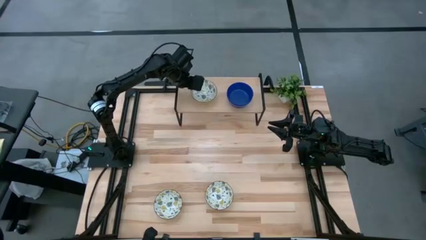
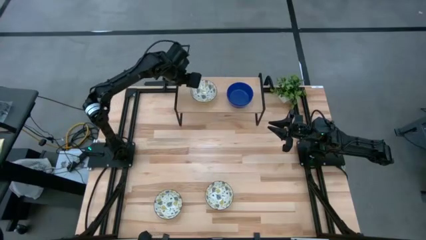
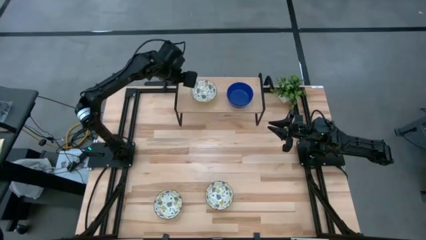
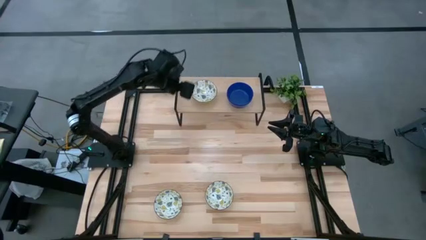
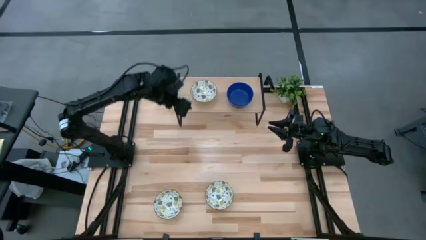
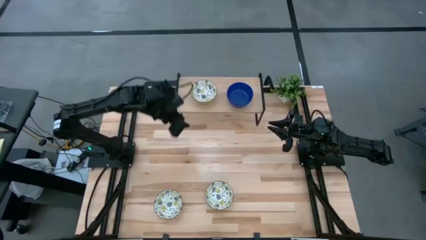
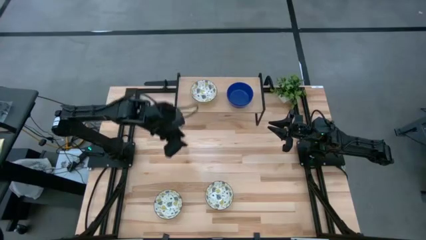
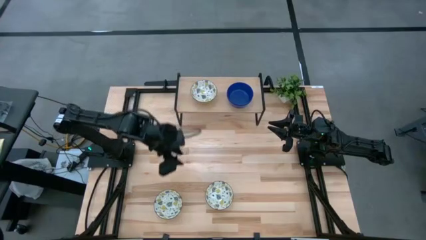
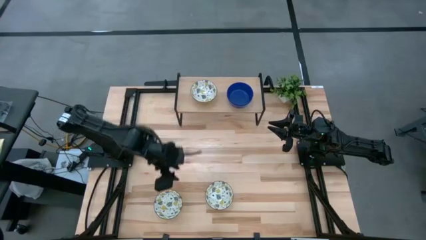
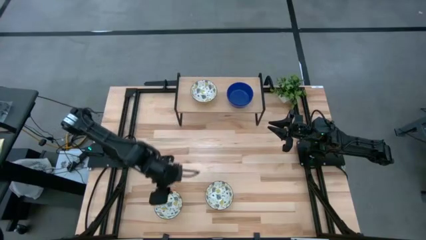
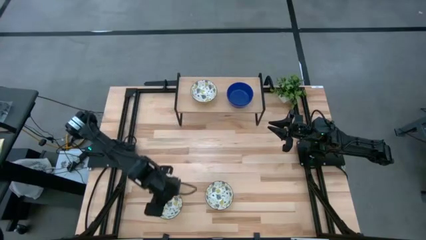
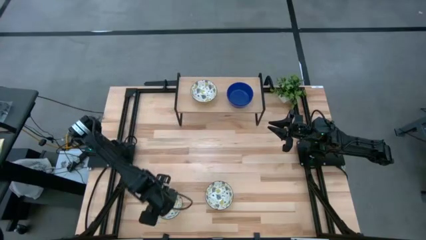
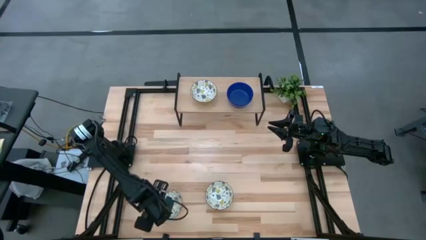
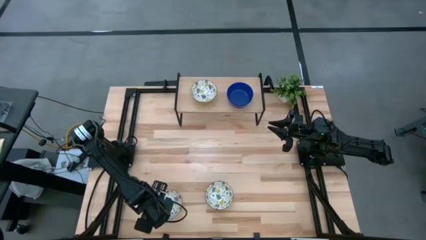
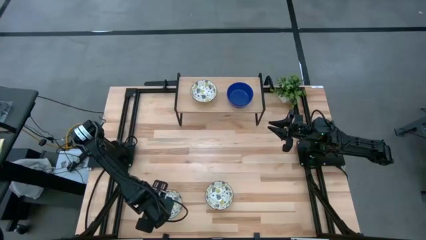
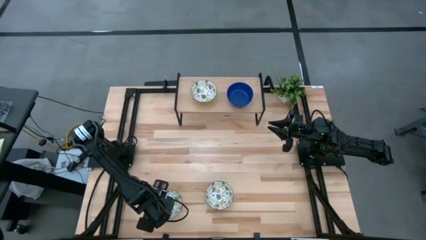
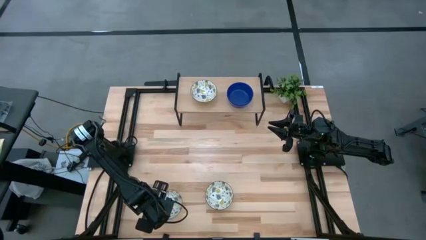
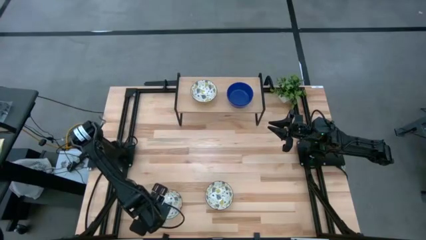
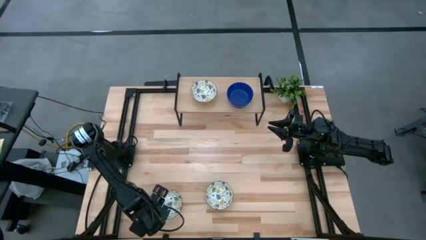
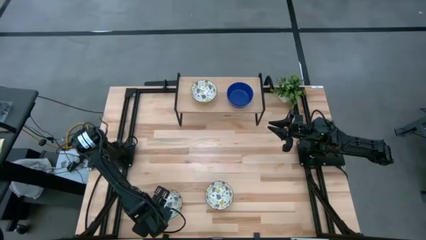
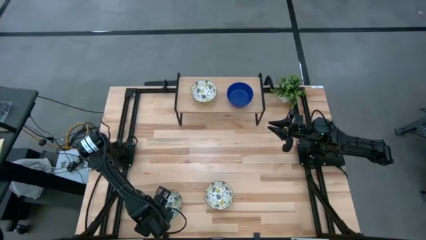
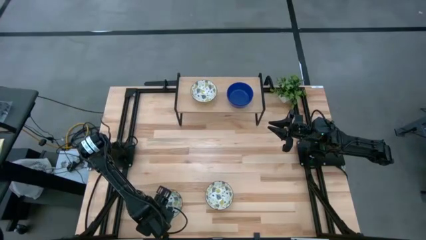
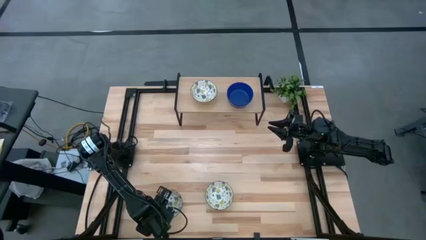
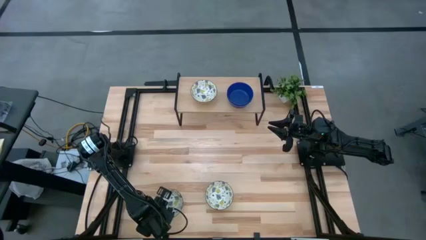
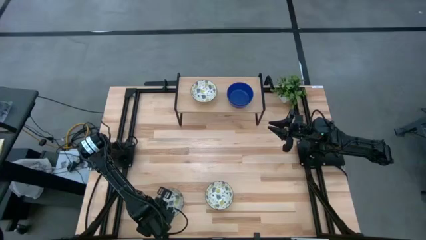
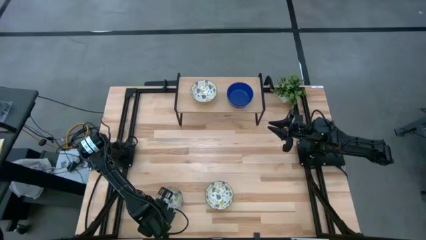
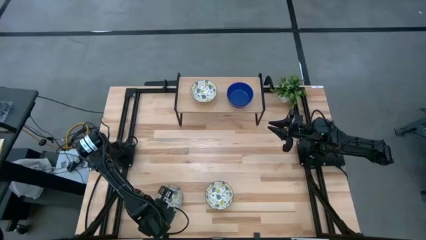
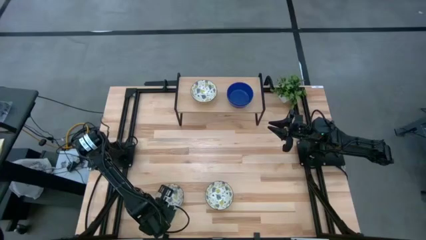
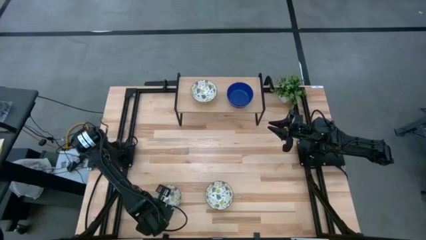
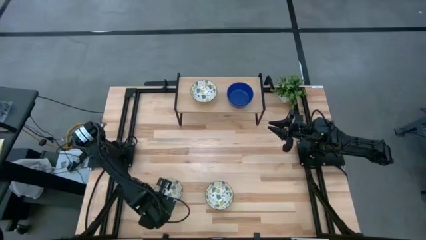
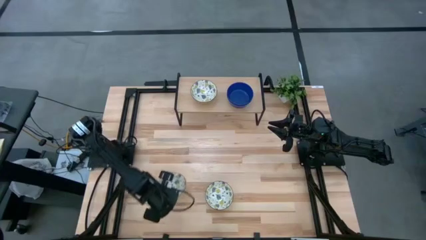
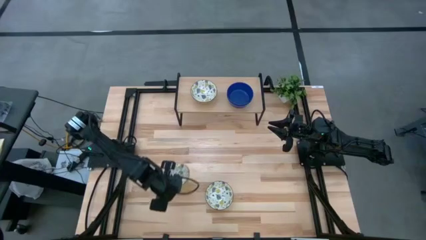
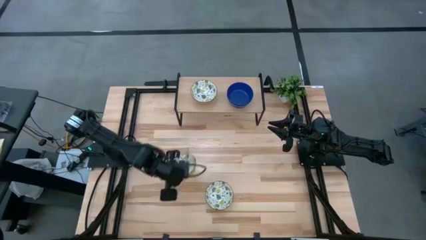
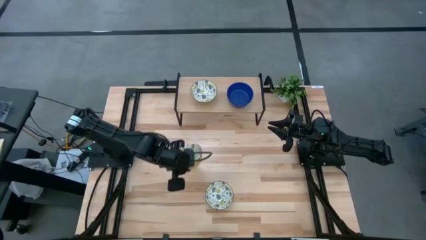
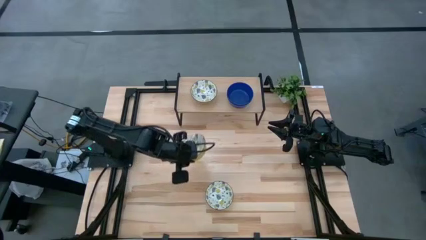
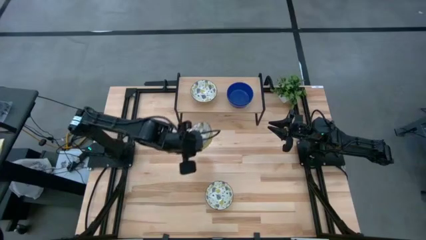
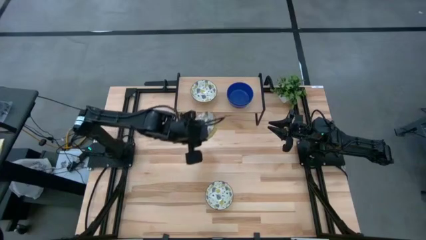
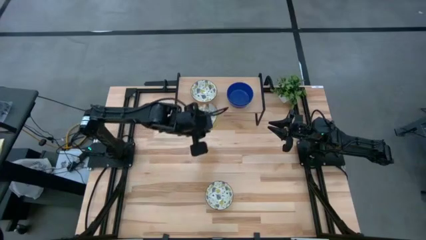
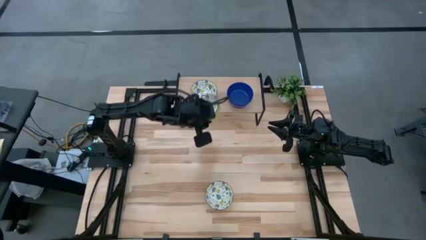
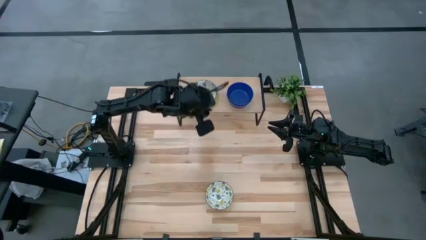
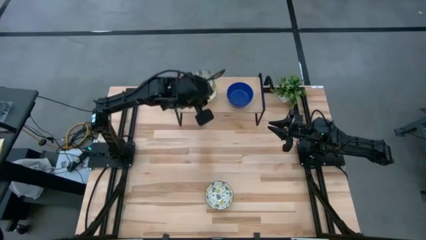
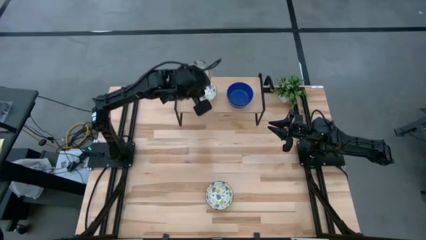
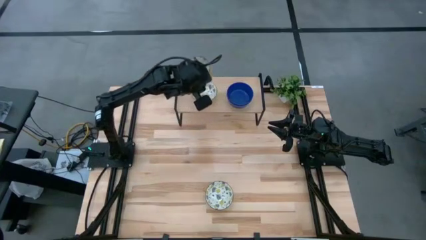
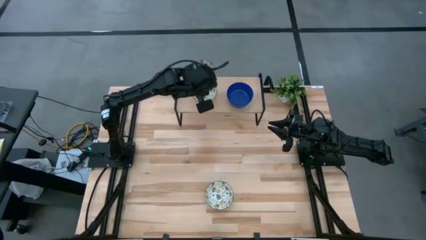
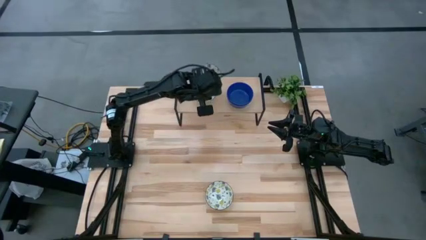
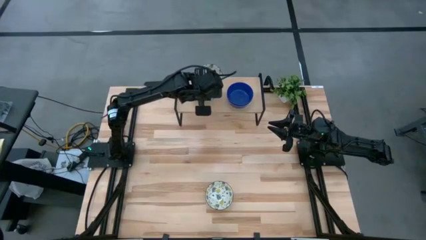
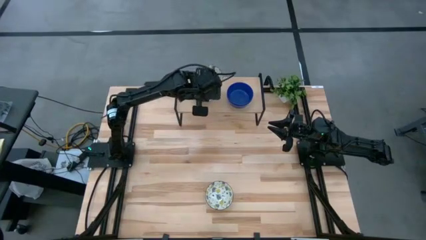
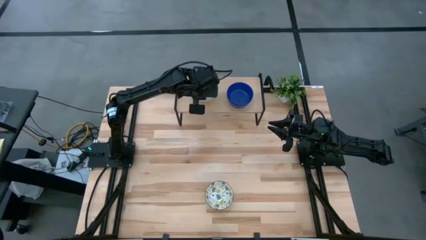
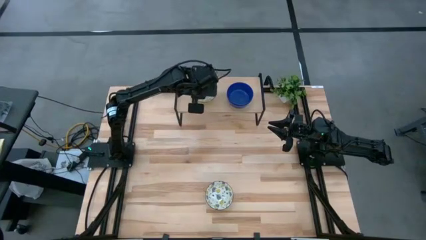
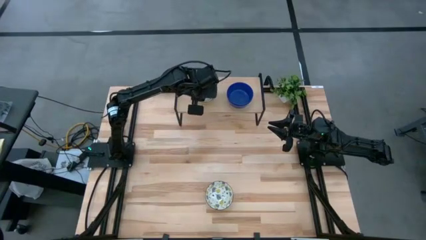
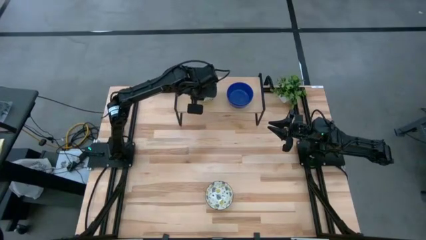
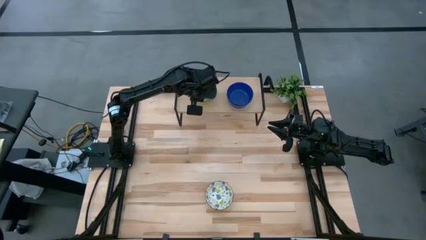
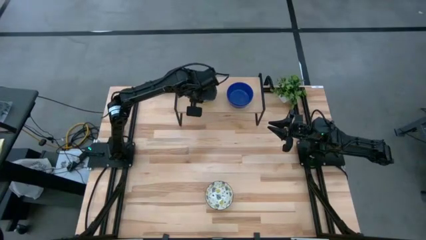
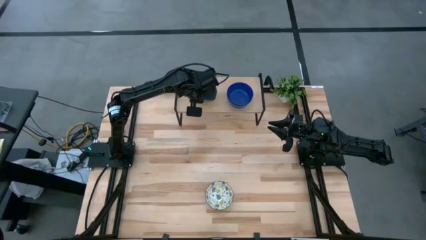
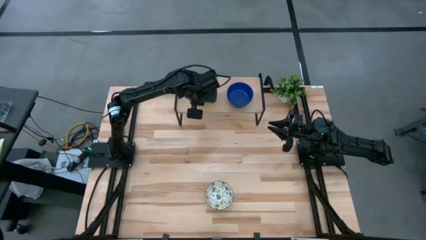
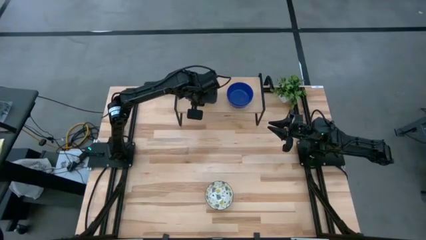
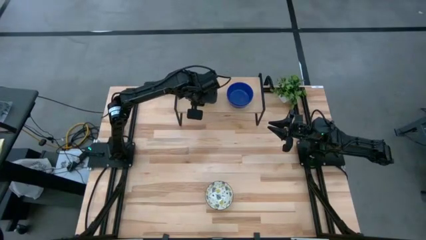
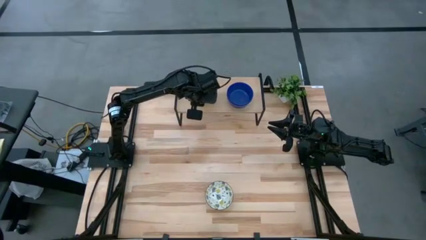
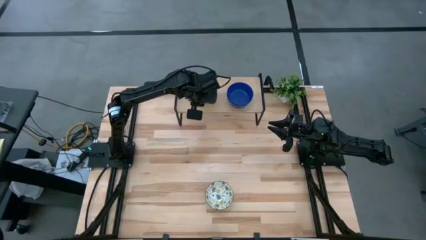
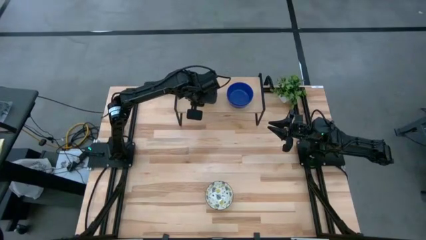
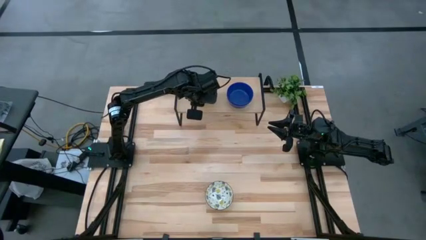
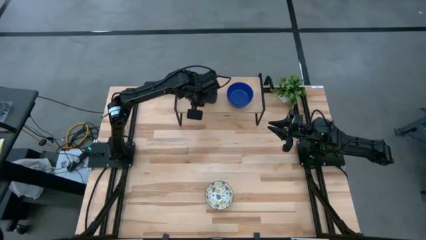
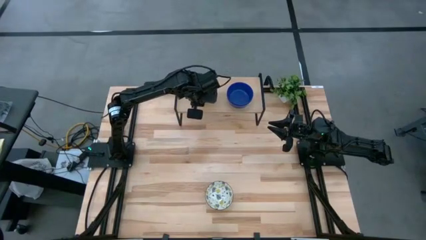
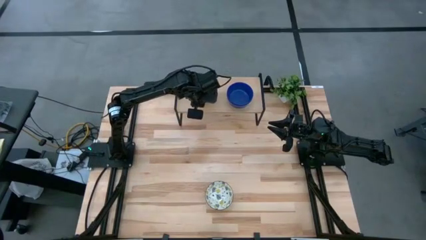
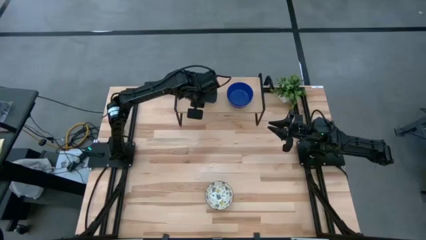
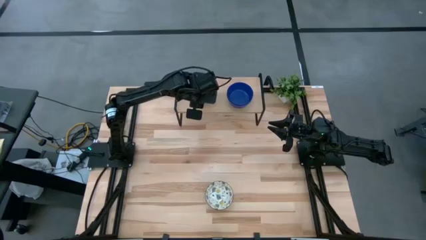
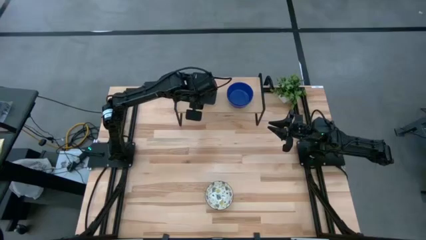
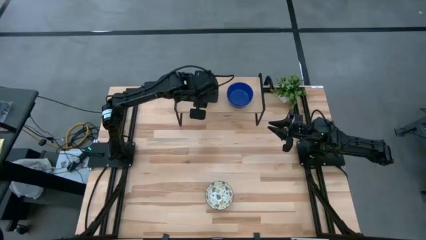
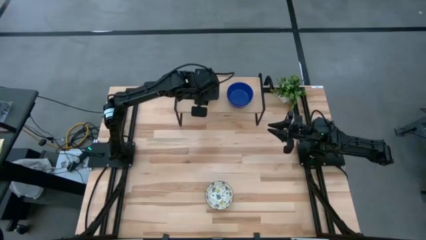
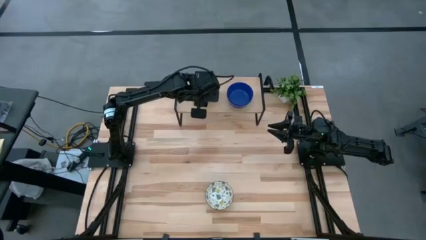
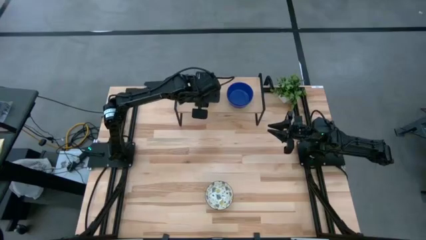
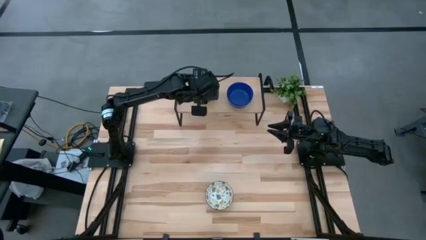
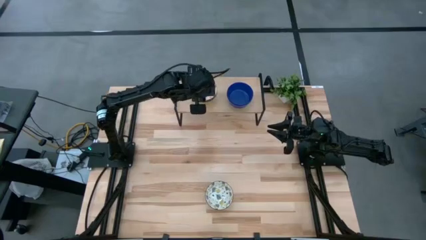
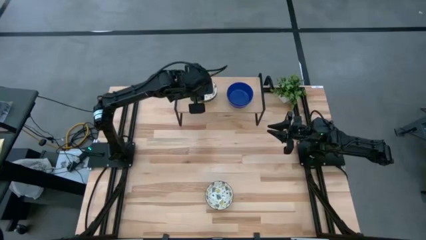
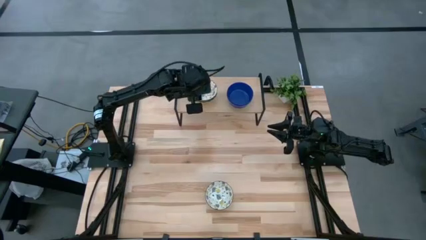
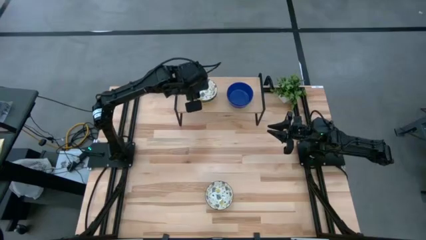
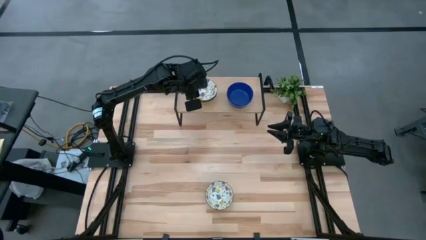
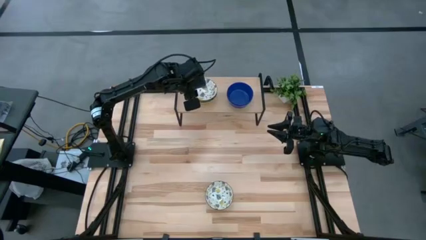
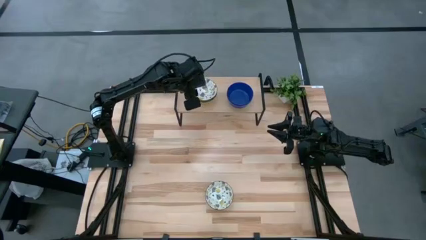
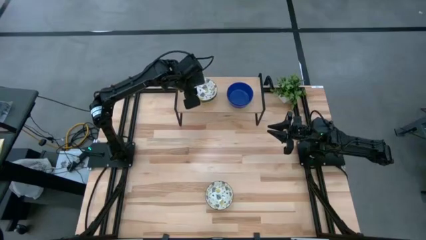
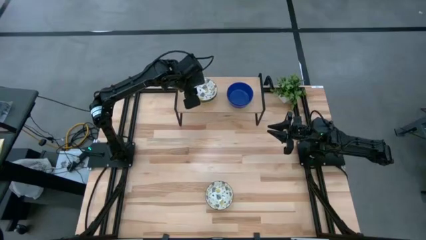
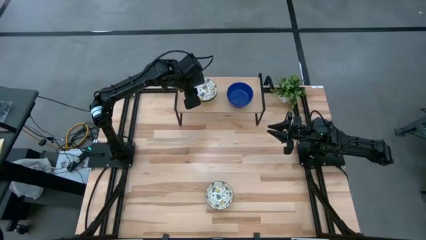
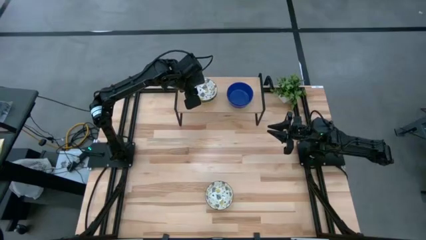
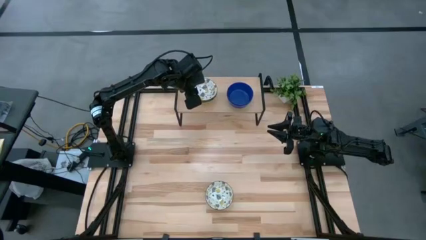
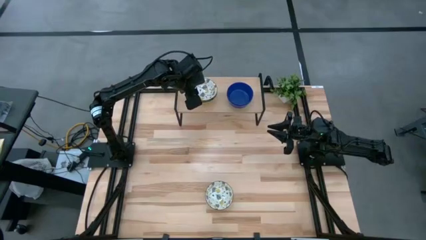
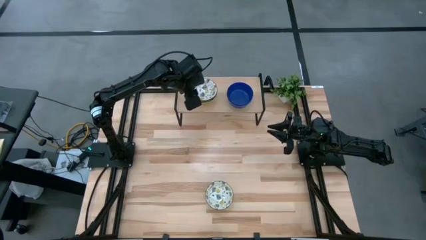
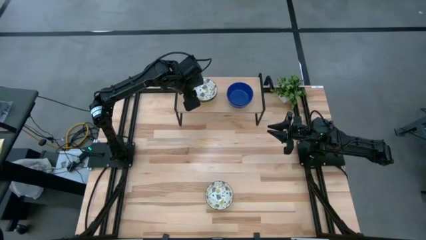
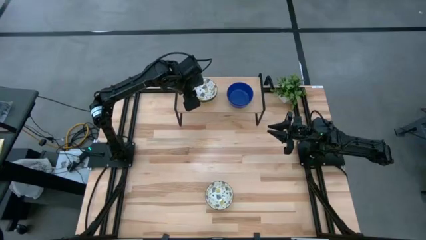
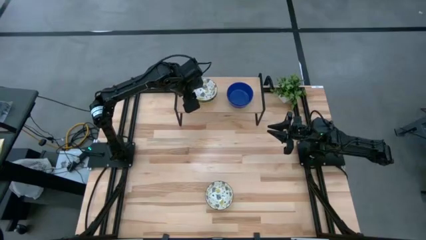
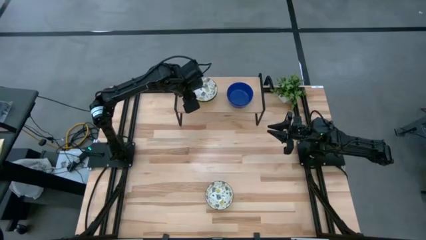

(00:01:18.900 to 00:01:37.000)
Task: Pick & Place Mini bowls
Stack the left white patterned bowl on the white patterned bowl on the shelf
